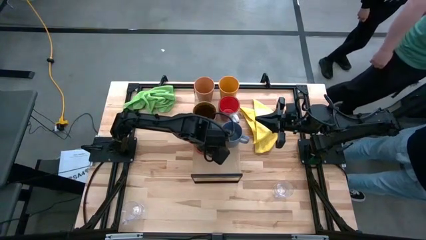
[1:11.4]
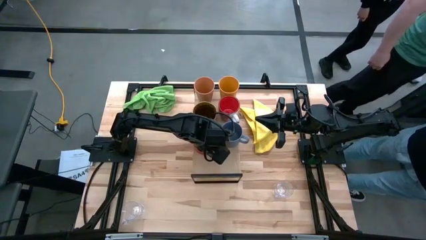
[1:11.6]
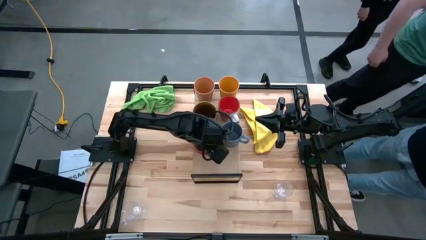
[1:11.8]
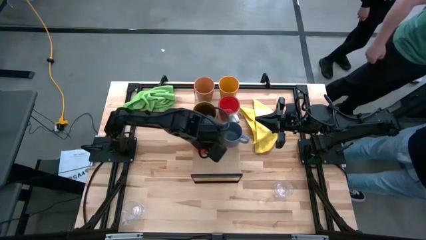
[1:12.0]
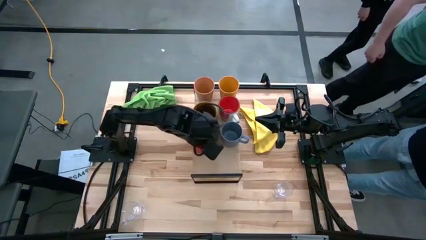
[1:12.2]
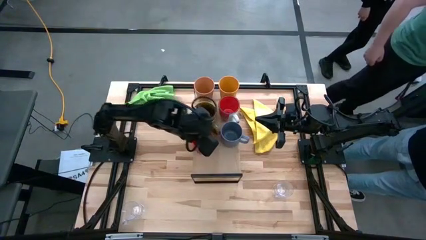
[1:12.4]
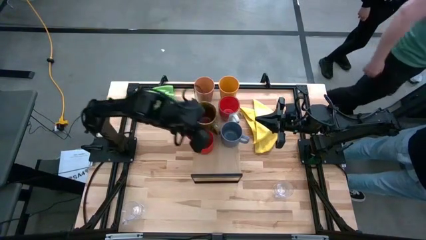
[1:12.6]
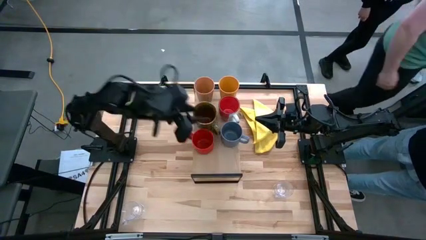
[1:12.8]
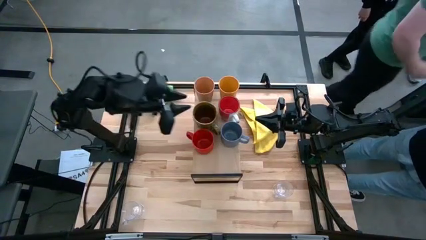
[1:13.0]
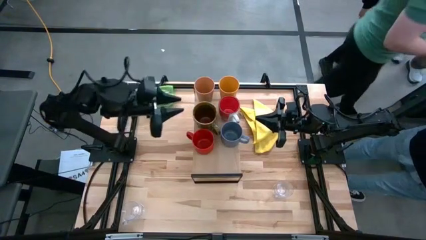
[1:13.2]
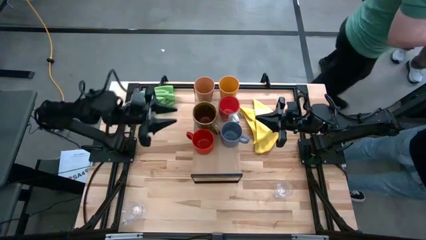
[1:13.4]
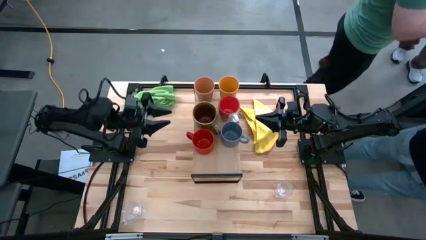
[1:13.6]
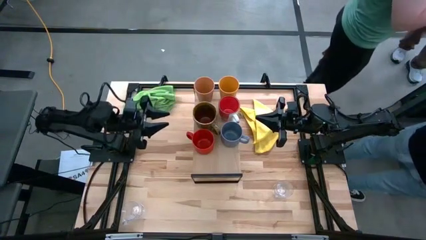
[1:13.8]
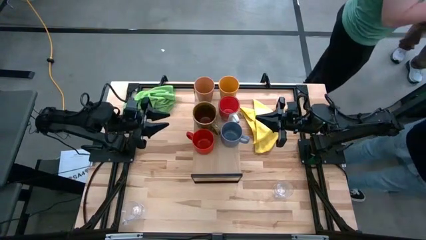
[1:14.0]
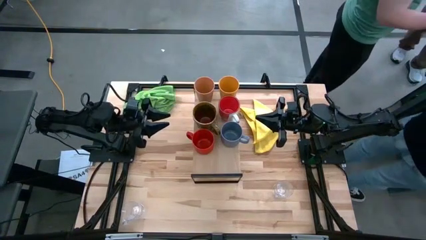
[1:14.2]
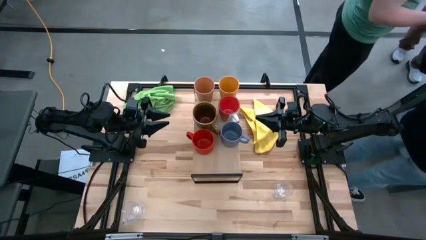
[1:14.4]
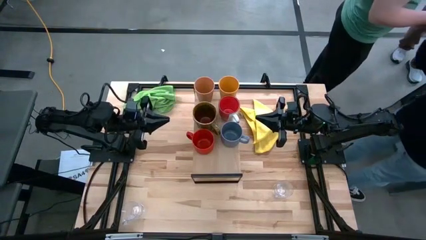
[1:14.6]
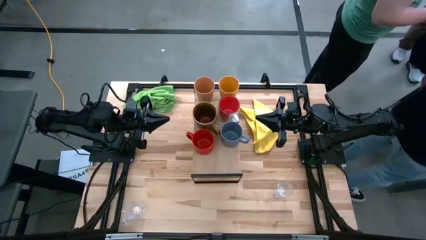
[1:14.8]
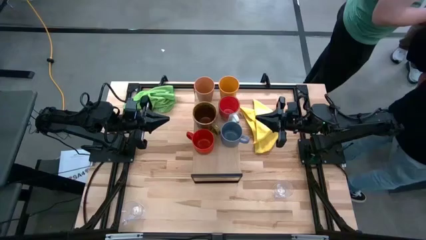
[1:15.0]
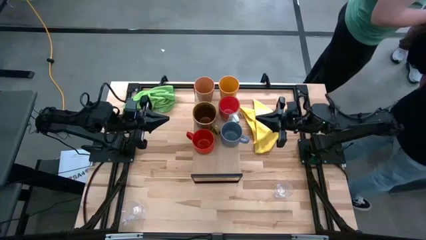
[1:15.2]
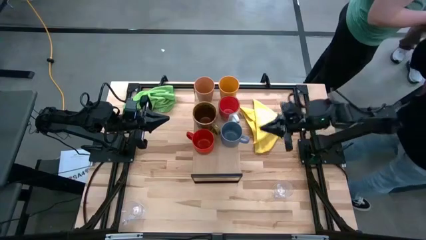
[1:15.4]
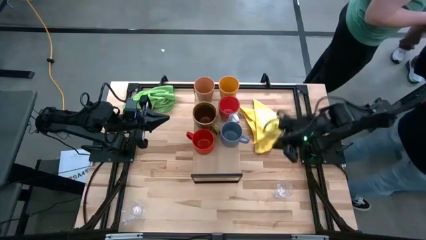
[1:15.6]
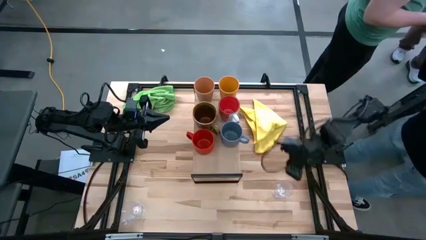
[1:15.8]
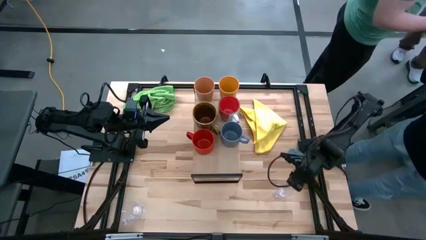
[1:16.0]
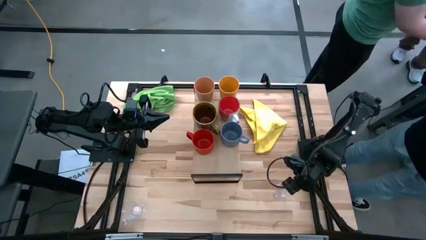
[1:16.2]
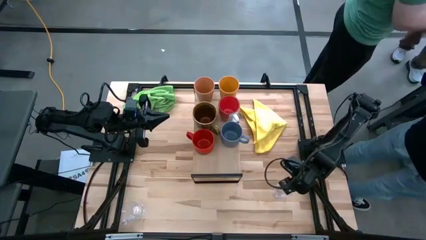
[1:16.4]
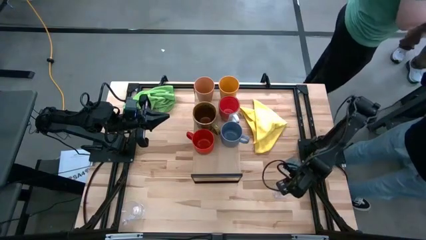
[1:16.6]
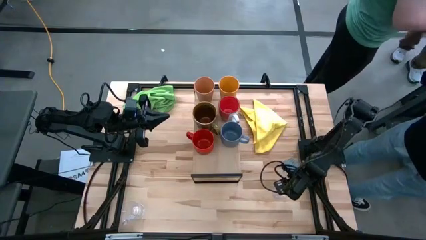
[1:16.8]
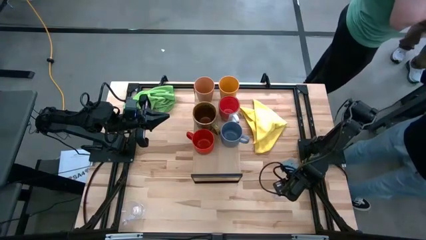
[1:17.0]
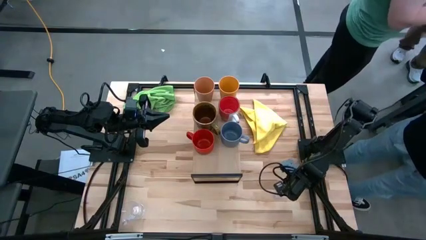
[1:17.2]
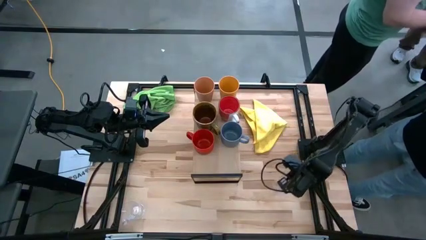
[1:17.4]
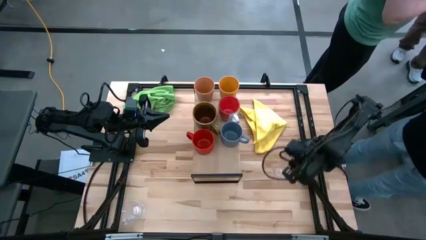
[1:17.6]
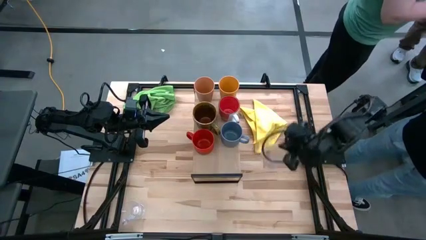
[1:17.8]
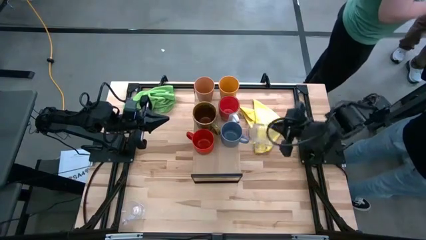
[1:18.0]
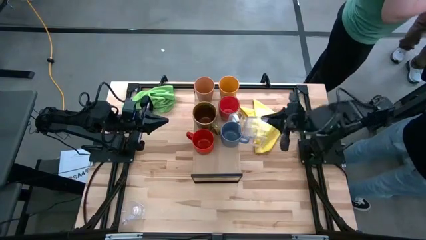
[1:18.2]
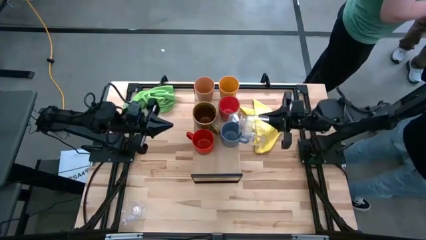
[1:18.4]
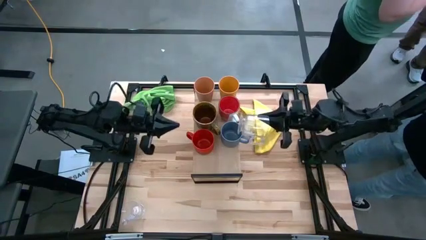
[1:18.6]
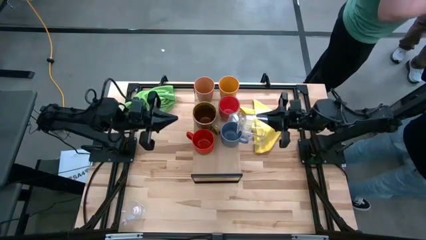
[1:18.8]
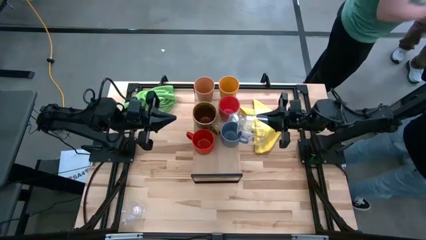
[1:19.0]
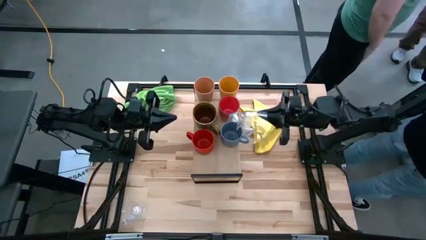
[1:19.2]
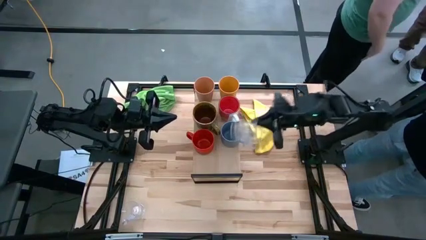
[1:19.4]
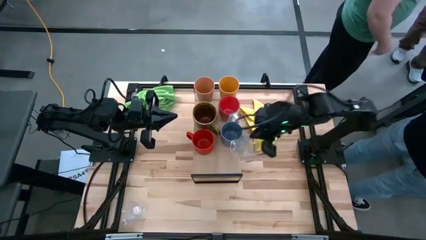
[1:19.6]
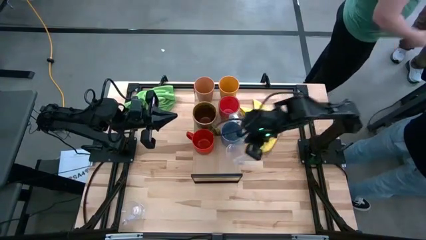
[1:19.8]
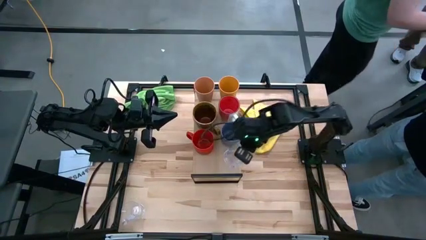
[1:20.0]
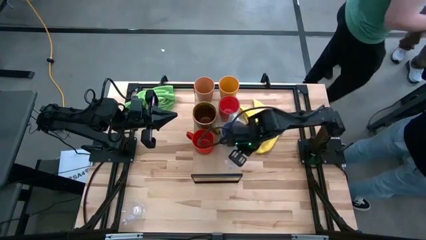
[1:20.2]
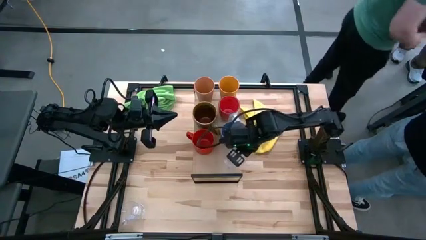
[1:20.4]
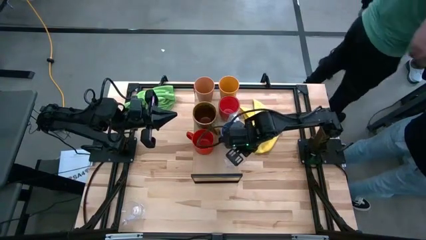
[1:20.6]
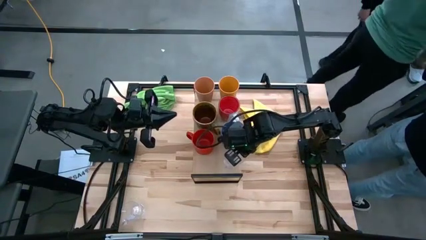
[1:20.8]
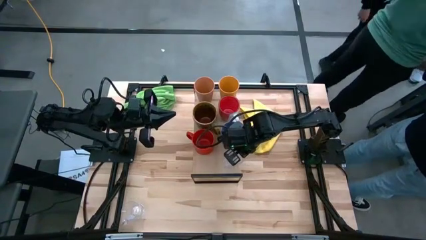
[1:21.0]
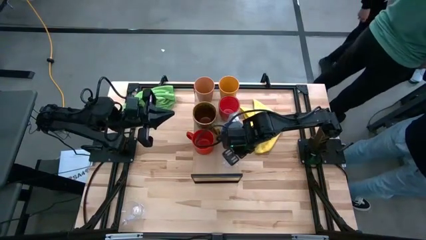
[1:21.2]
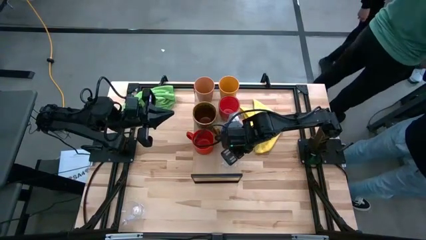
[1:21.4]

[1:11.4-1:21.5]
Task: Stack small to large cups/mugs on shelf
Put the top transparent cup on the shelf

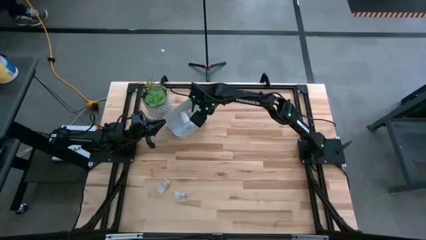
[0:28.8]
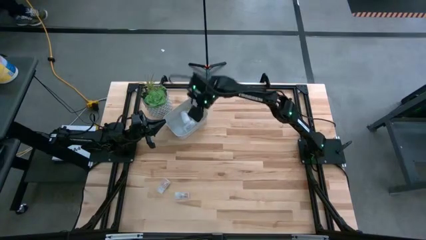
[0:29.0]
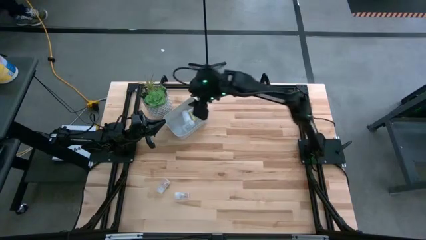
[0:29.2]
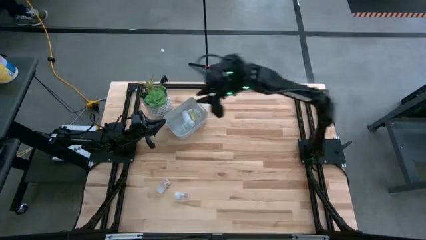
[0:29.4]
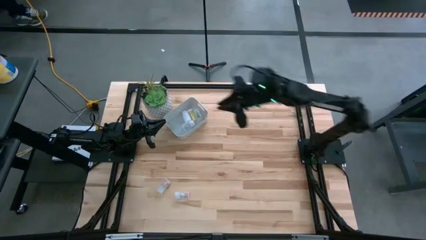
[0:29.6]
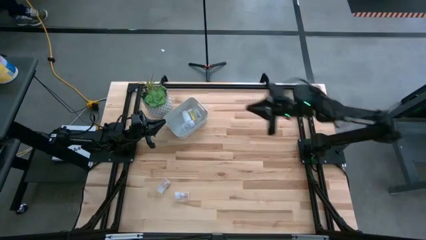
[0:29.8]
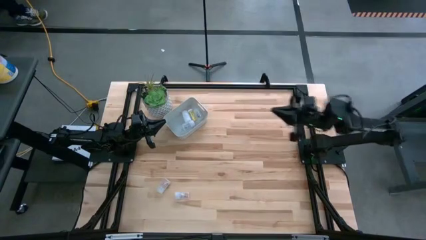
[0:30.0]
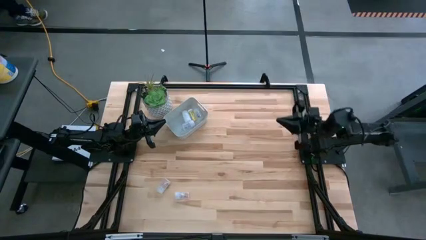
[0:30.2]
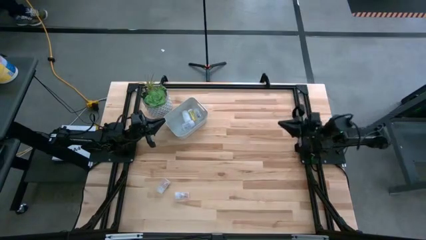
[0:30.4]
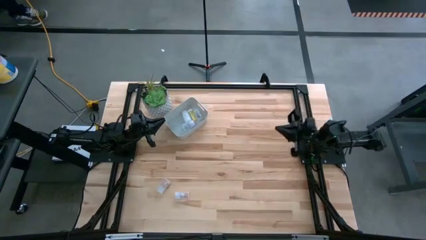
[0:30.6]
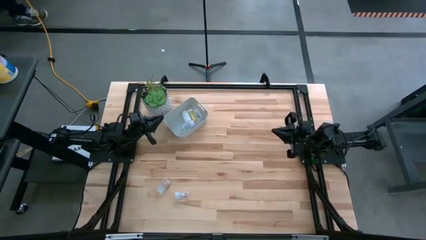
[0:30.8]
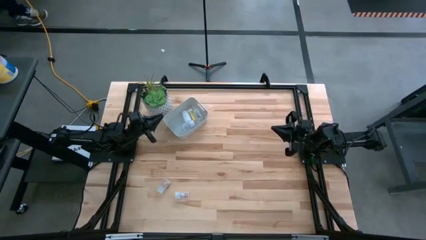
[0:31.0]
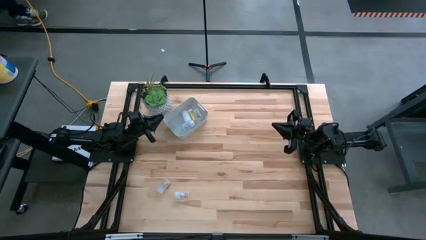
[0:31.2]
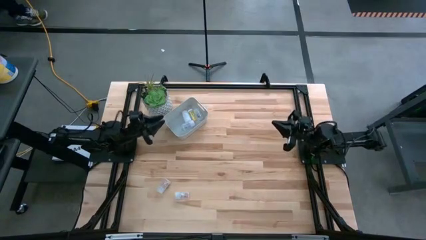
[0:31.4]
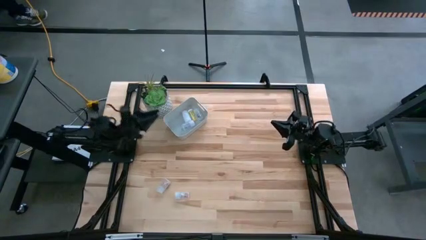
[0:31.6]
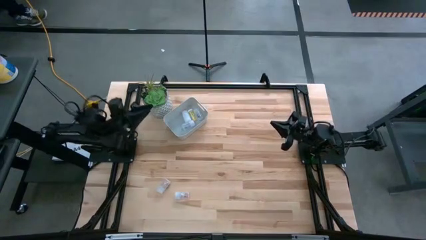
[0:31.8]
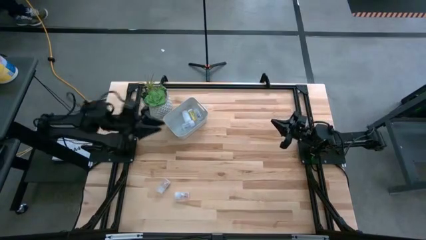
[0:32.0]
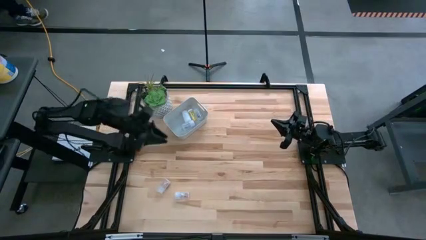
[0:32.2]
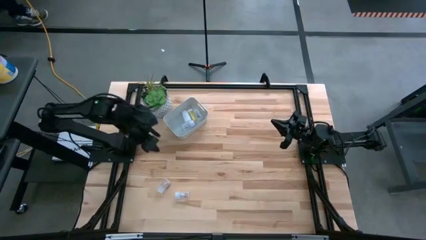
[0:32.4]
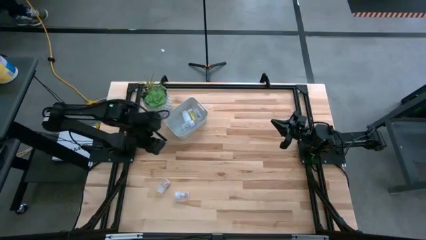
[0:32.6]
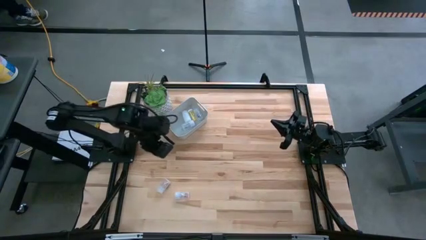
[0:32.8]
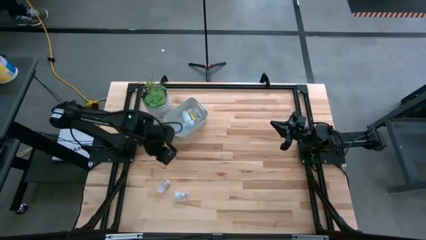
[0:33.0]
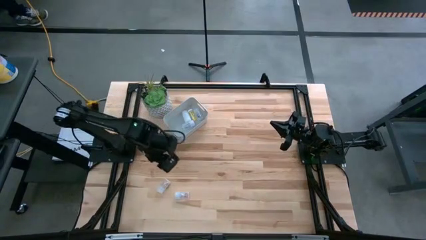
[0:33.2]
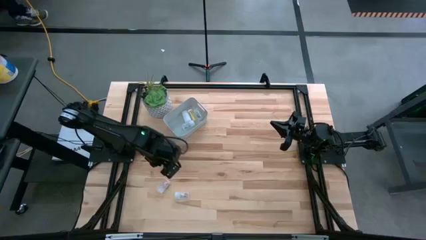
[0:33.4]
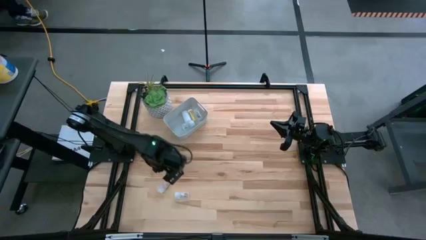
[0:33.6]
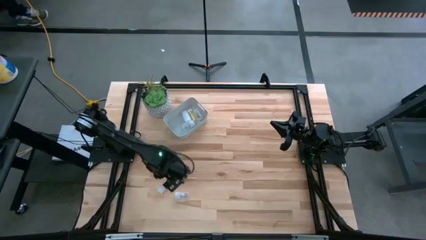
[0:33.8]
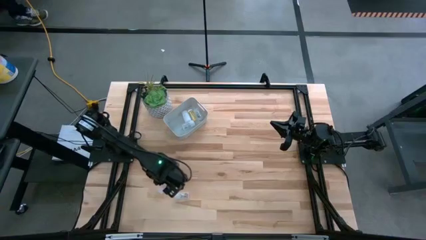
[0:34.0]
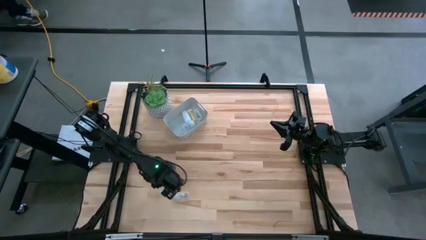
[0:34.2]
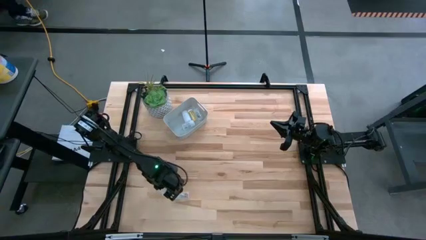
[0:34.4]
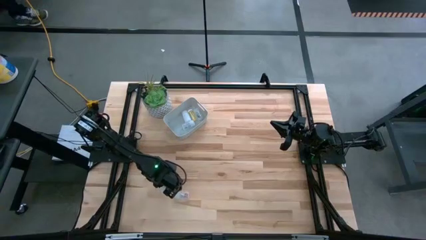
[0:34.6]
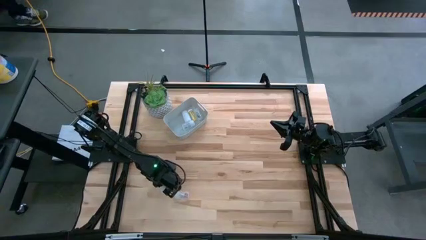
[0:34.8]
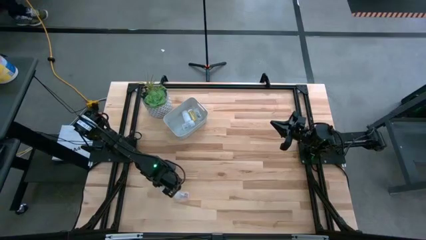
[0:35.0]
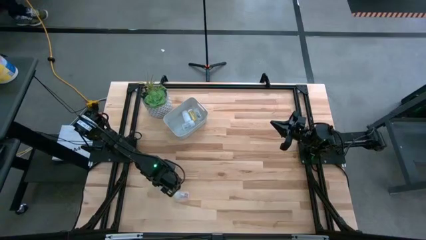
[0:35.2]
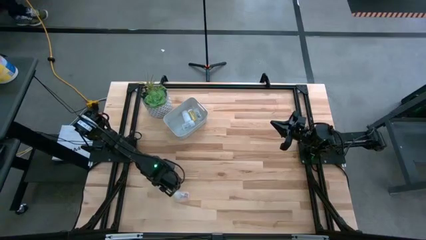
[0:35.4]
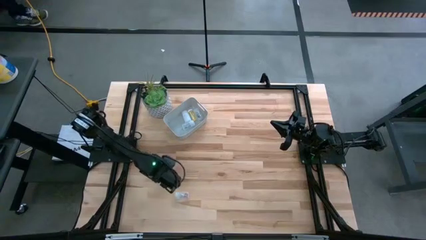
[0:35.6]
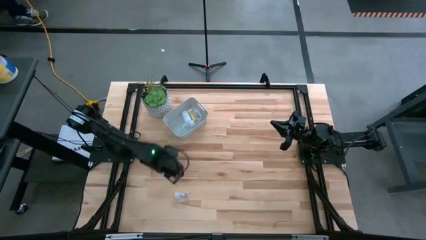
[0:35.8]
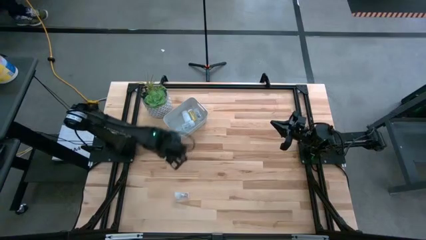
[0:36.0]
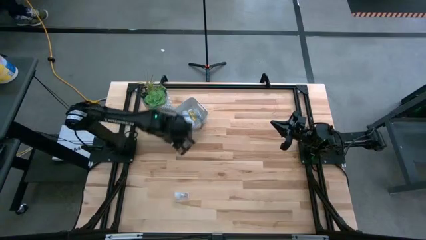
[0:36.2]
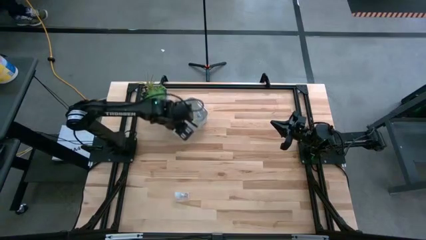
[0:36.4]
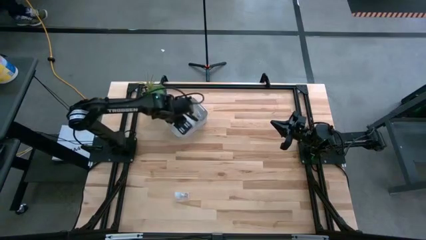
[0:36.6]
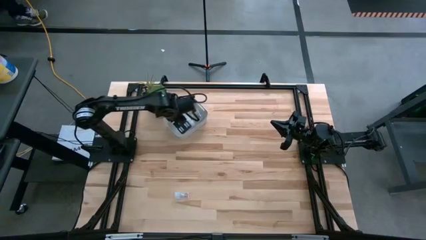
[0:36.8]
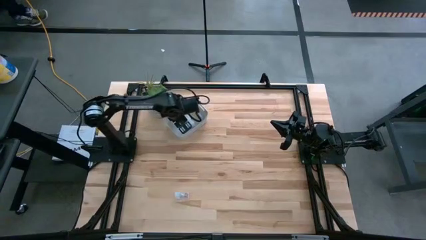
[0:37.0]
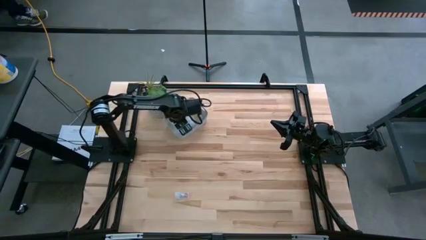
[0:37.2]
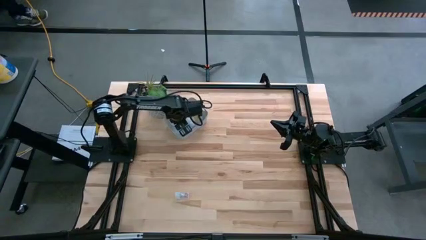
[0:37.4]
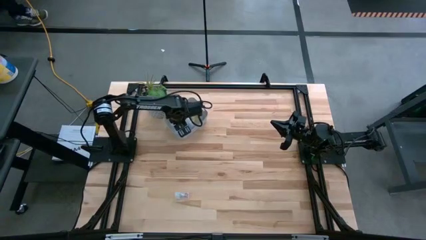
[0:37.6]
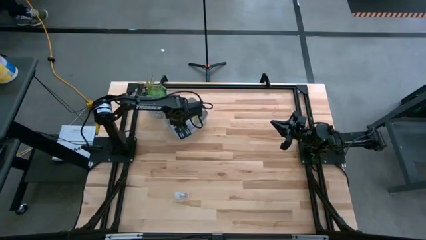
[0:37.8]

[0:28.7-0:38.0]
Task: Pick and place pill bottles into a basket
Put the top transparent pill bottle into the bin
